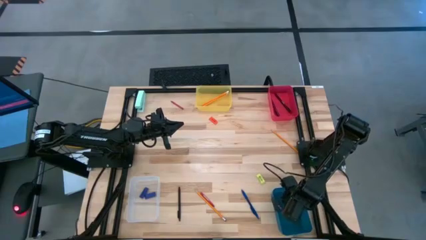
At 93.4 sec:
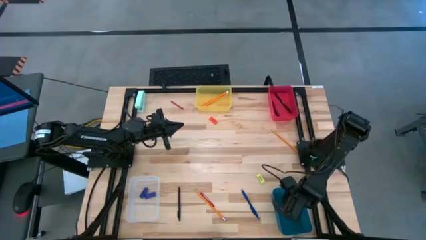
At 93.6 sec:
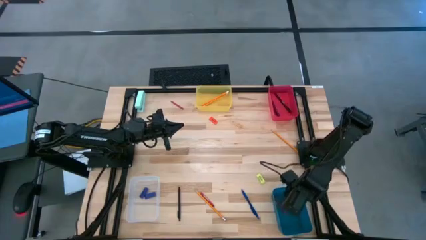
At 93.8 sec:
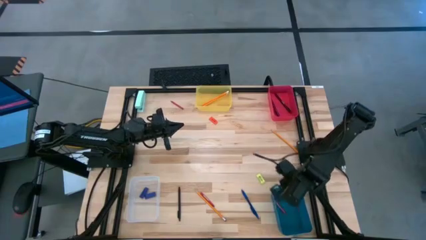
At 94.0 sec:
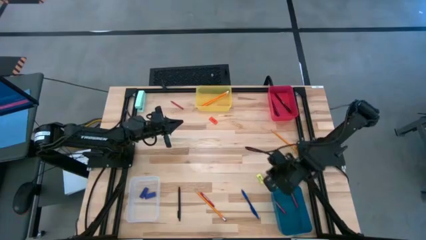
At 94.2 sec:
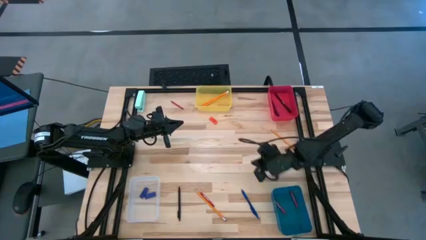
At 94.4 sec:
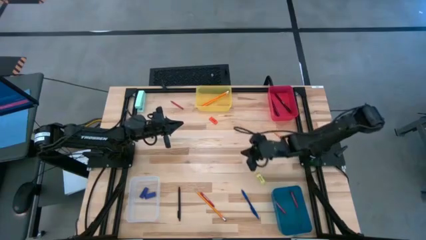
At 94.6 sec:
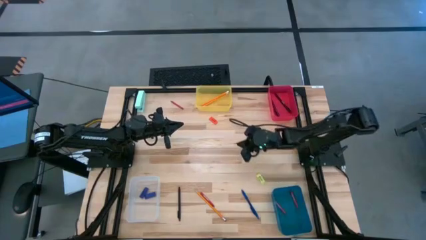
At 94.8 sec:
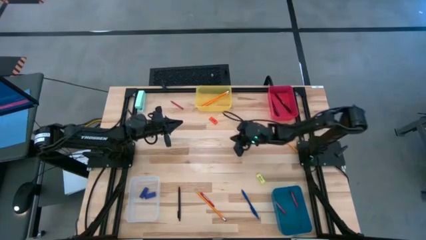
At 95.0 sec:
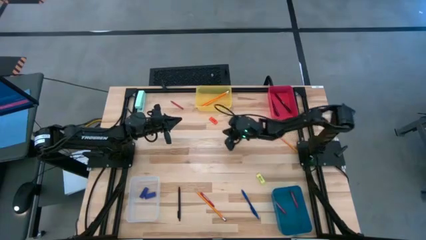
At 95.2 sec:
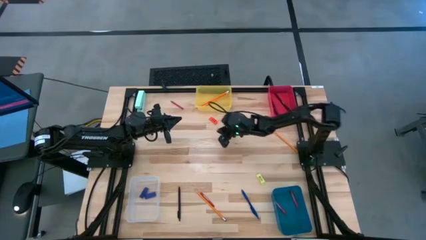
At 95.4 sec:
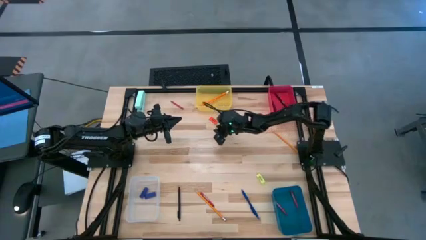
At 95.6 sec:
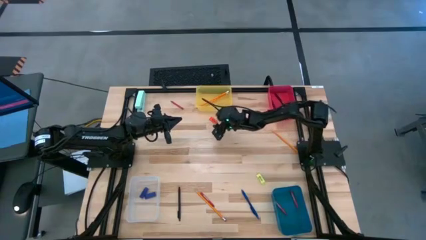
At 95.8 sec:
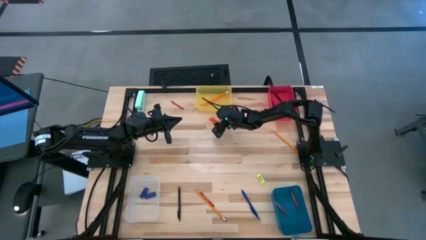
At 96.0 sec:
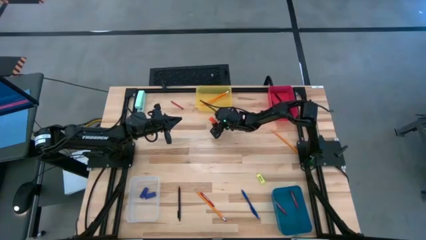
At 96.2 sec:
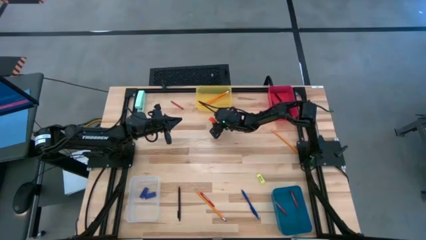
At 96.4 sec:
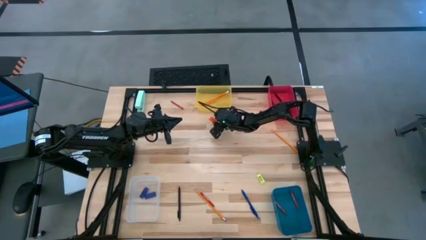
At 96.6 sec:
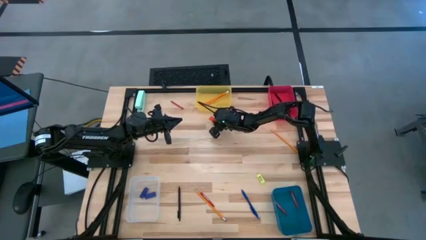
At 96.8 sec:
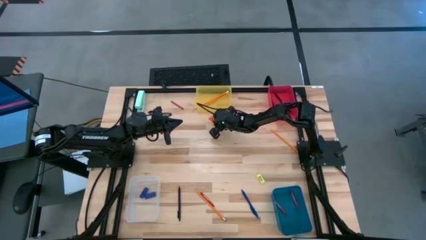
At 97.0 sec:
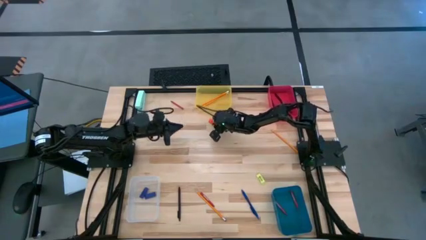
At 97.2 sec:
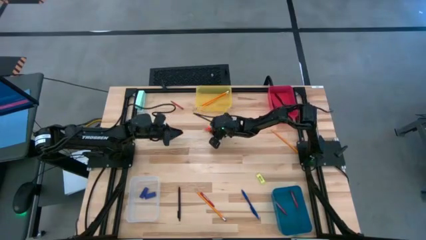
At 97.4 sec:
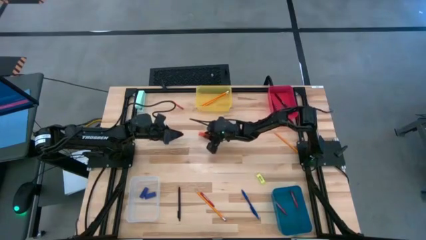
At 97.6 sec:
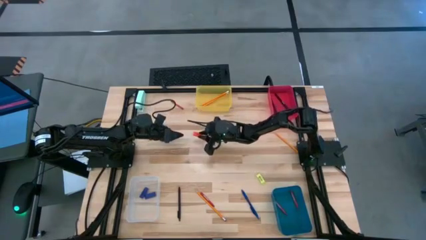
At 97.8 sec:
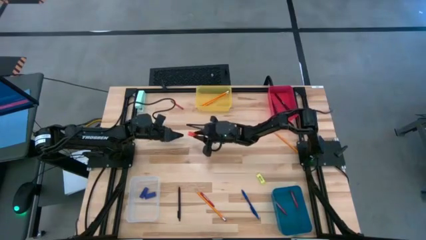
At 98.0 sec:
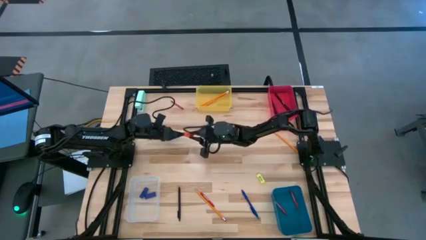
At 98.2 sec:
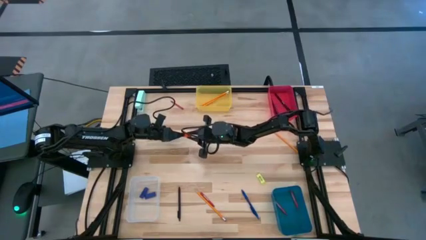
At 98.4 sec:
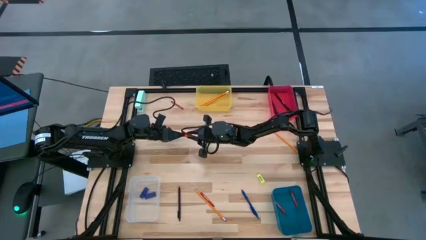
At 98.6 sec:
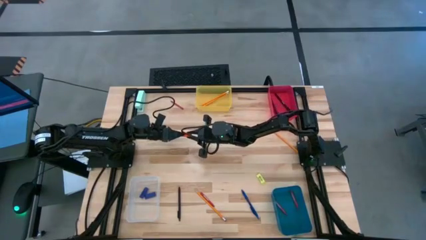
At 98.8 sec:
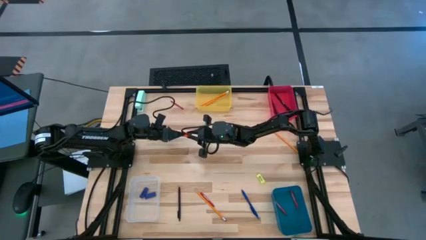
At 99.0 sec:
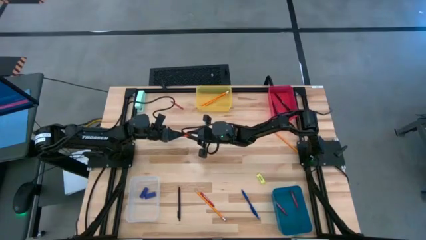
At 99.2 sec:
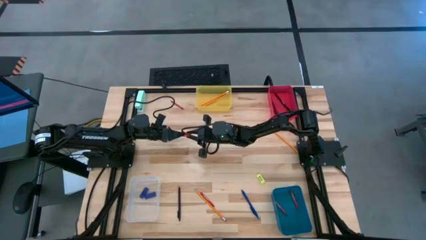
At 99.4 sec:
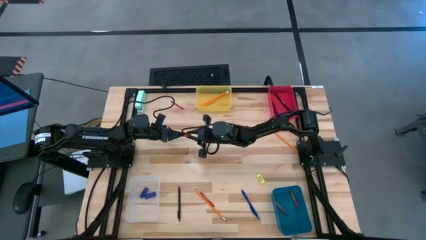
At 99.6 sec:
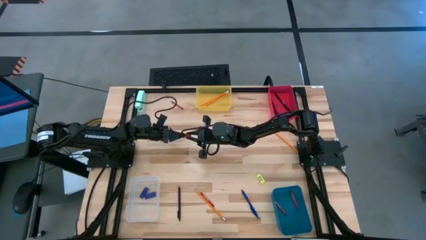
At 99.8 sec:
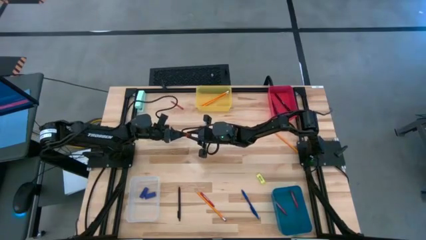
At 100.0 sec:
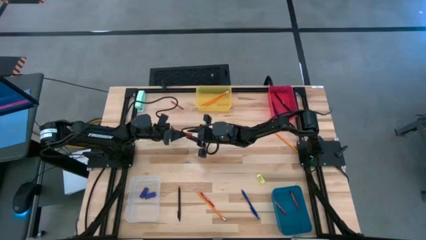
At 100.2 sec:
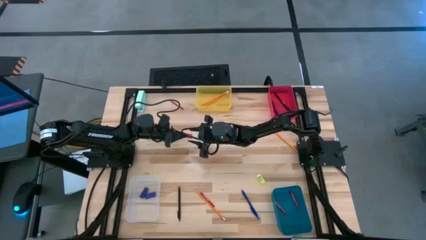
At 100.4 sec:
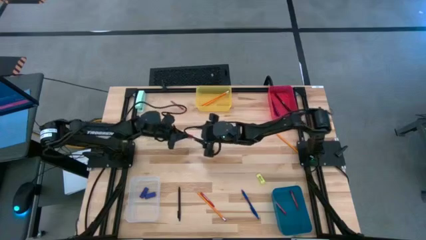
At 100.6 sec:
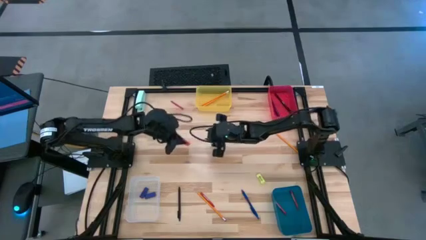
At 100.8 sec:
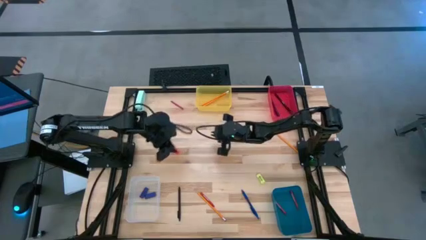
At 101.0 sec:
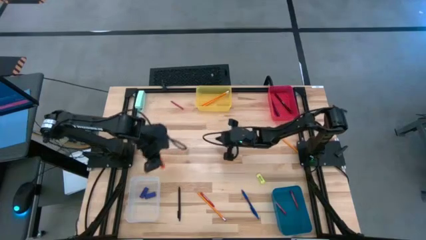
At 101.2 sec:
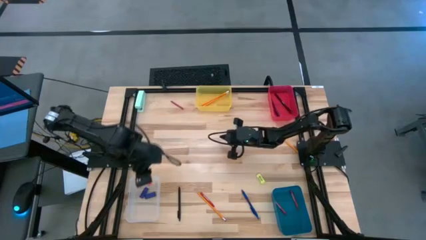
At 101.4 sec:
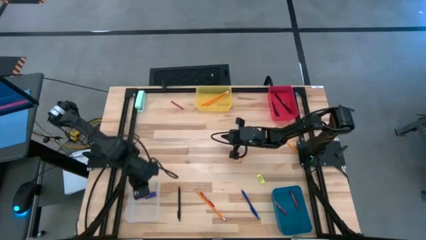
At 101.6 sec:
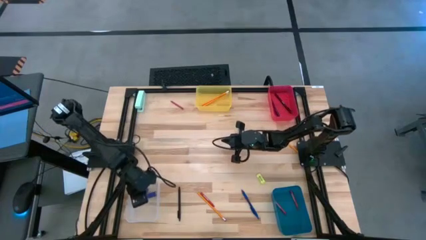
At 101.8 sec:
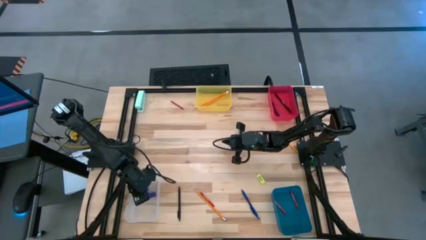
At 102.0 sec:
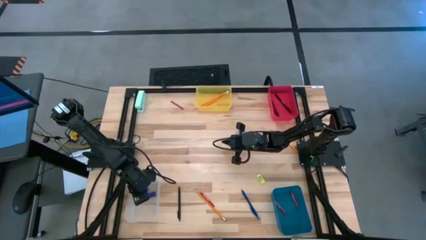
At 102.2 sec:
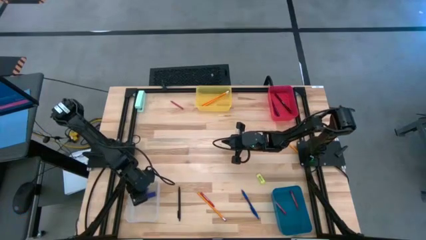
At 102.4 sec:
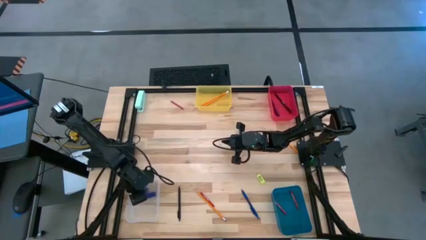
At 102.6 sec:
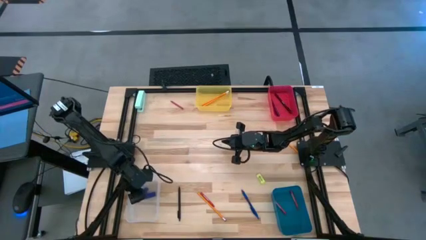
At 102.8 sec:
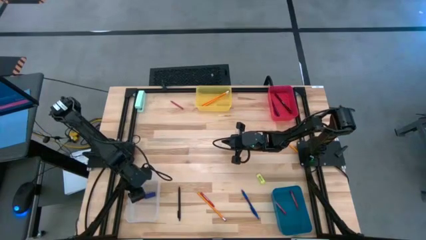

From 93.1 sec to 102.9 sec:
Task: Sort crayons/erasers/pens/pencils in bins
Put the orange eraser into the transparent bin

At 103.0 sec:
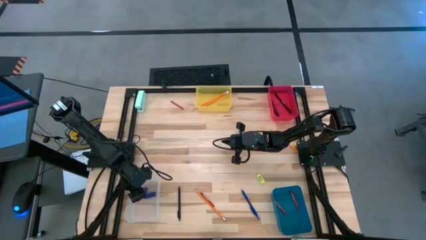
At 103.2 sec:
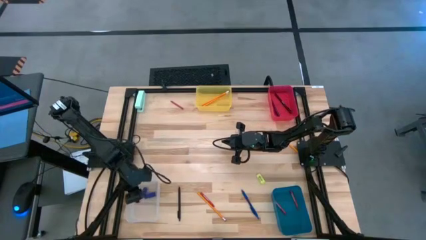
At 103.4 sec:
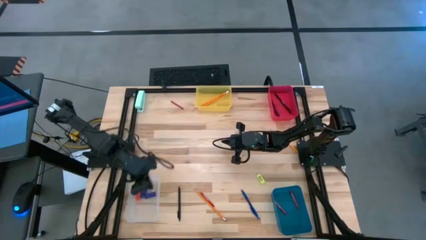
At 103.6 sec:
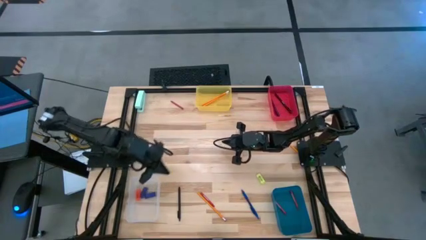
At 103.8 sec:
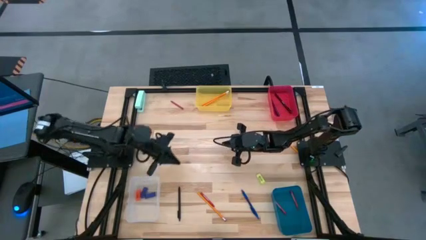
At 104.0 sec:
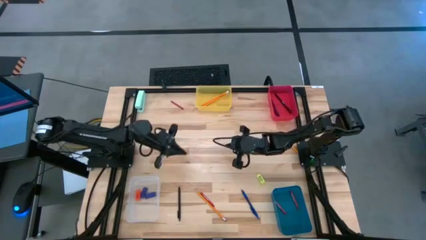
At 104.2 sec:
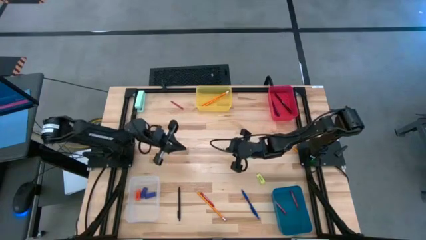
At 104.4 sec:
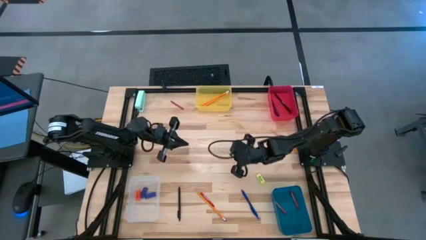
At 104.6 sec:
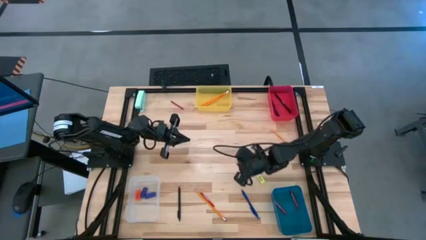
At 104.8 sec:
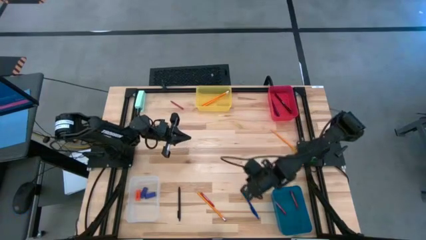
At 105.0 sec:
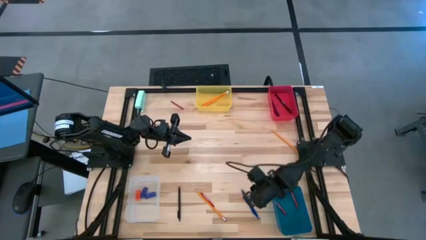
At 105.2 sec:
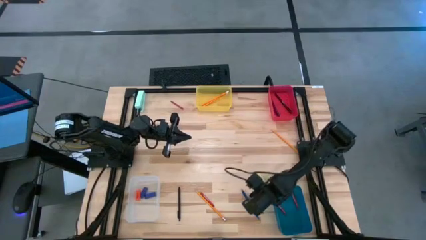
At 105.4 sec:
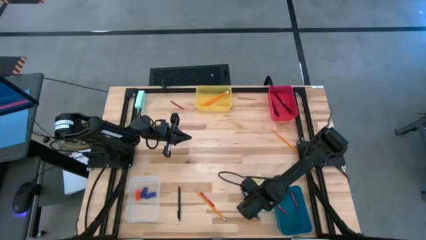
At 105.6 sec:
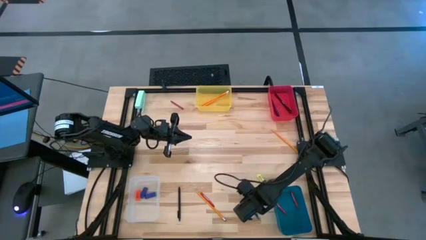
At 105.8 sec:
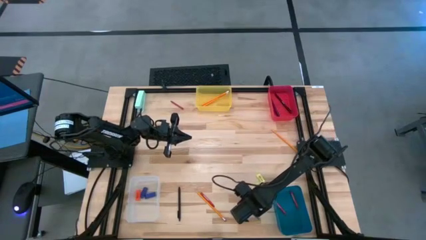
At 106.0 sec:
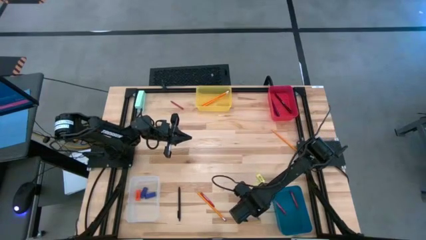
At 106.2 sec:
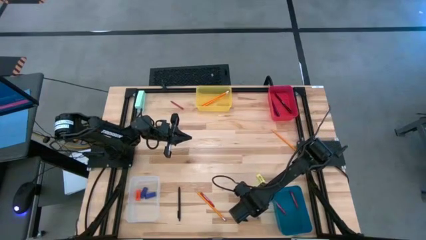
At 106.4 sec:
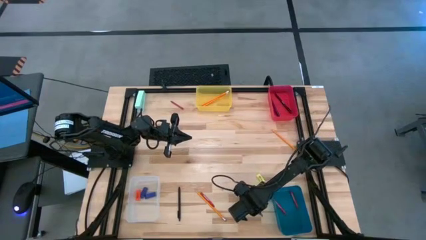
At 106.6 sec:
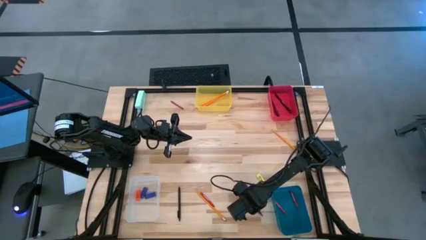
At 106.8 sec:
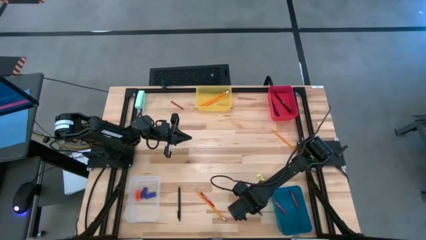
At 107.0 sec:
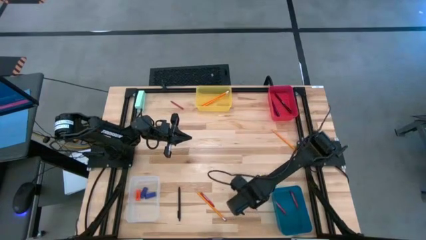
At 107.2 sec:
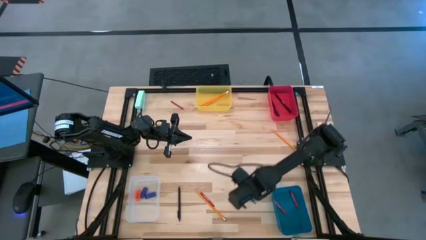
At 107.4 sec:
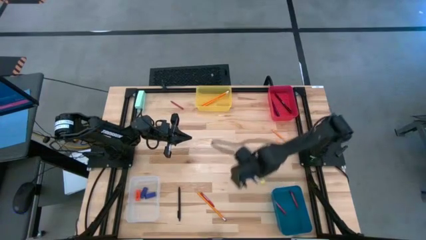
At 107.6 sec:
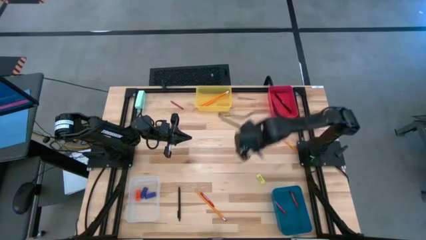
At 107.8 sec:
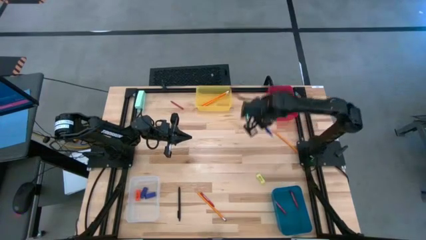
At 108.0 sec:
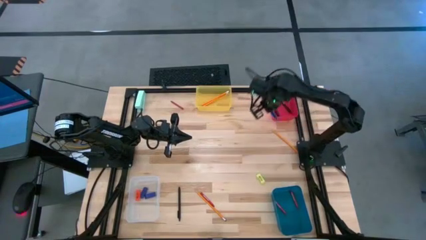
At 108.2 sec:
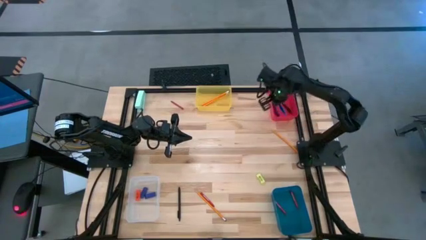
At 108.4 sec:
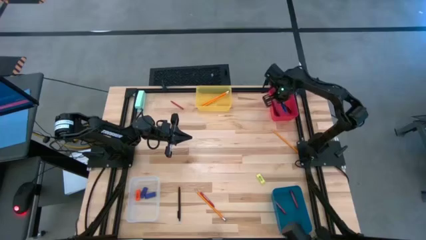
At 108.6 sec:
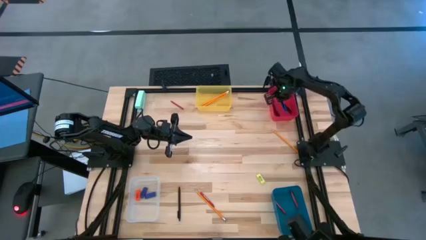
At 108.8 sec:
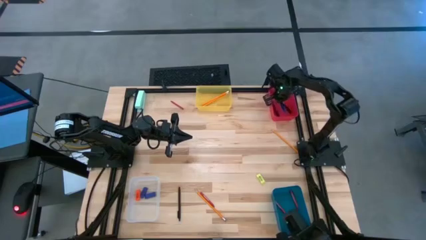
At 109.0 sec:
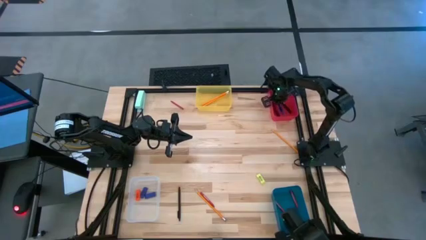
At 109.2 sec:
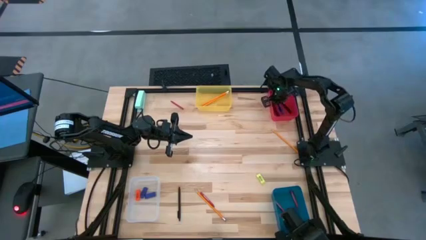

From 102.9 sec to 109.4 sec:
Put the blue pen into the red bin

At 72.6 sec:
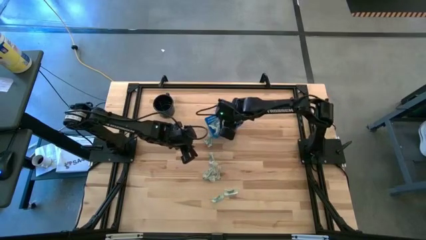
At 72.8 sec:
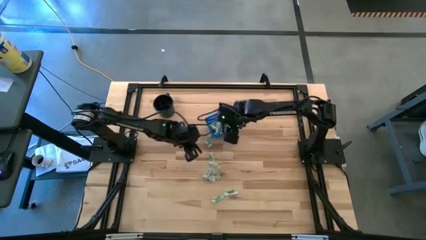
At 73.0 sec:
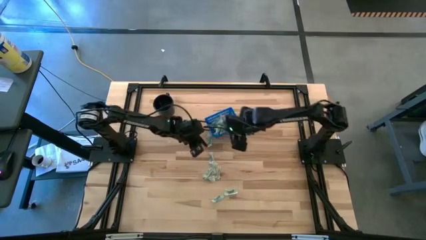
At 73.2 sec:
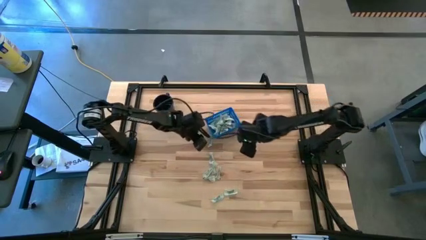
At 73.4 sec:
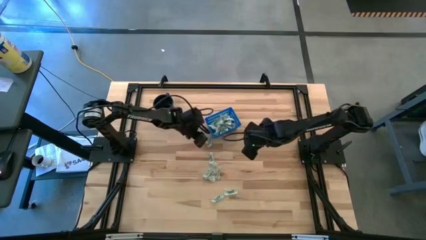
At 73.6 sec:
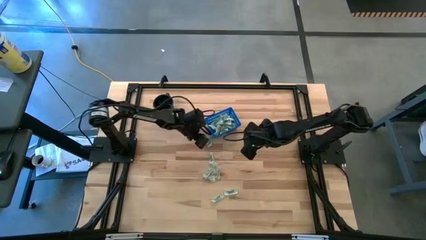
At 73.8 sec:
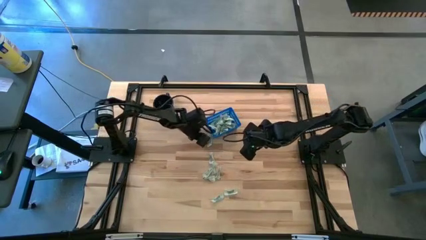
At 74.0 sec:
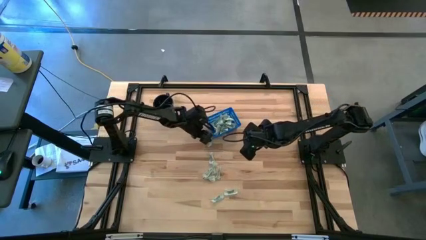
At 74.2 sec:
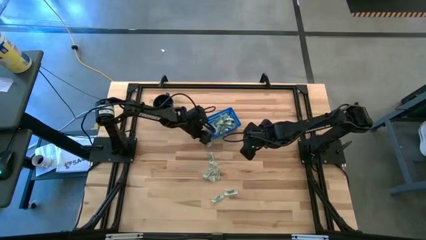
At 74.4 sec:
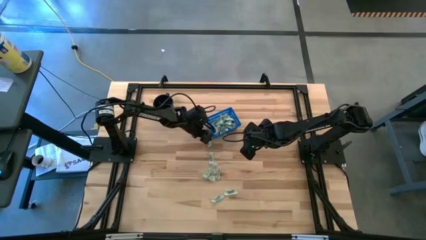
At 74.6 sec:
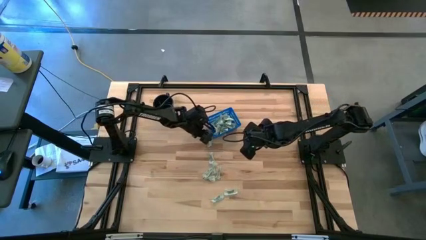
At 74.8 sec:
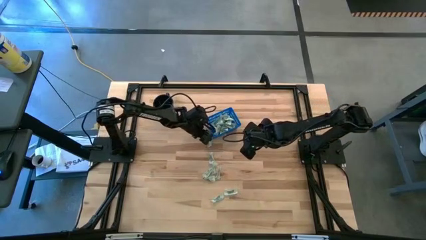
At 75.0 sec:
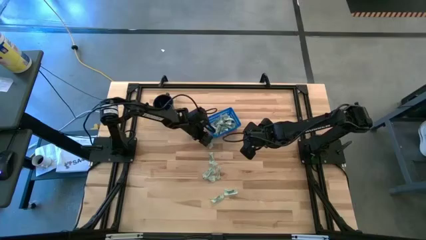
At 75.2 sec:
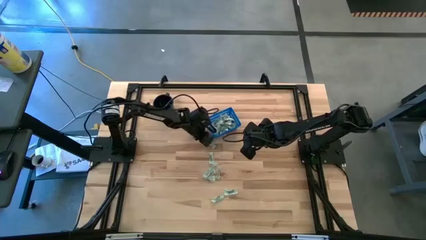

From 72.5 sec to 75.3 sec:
Task: Pick and place Stevia / Truvia into bins
Put the green stevia packet into the blue bin
